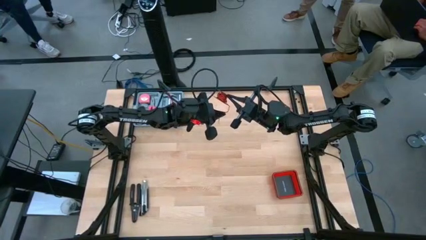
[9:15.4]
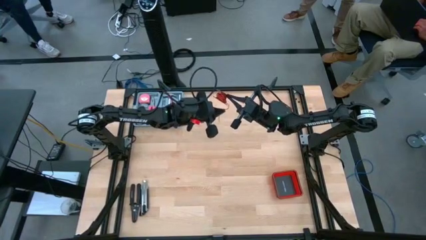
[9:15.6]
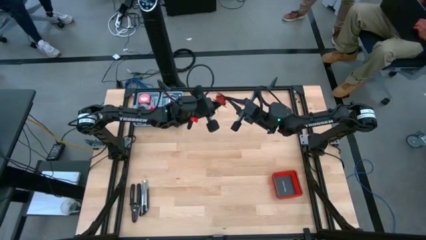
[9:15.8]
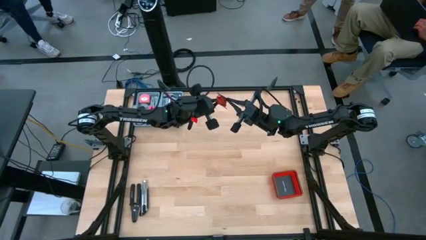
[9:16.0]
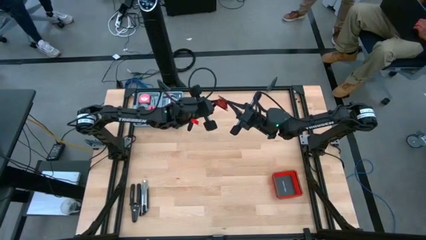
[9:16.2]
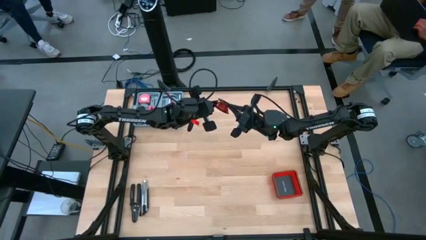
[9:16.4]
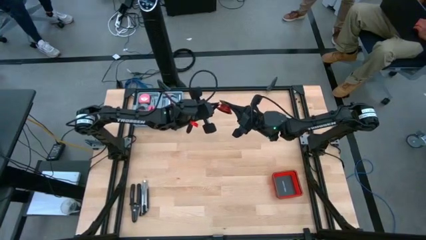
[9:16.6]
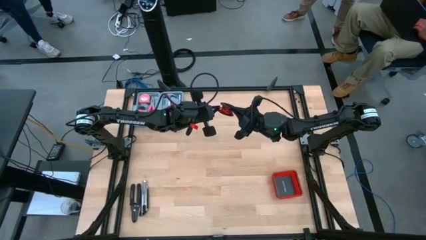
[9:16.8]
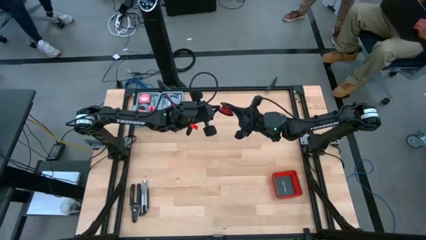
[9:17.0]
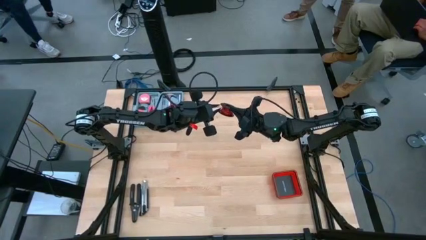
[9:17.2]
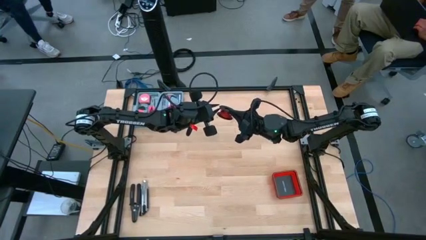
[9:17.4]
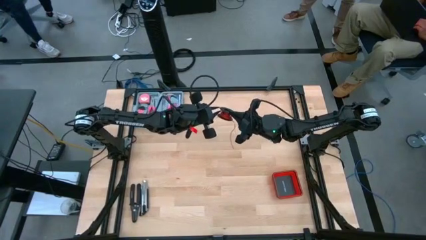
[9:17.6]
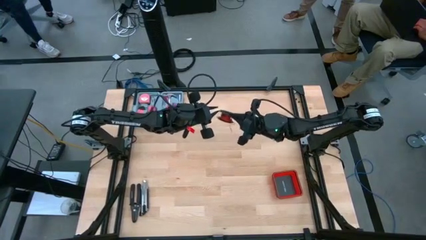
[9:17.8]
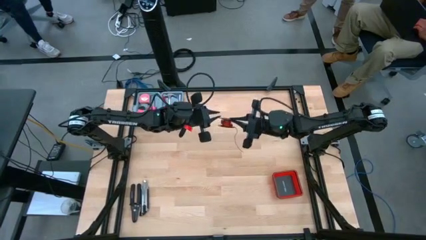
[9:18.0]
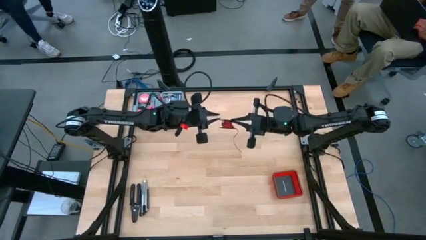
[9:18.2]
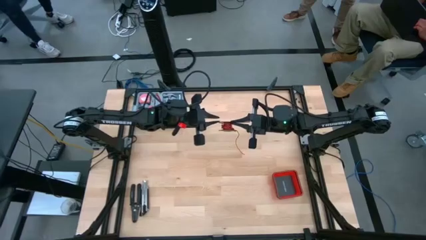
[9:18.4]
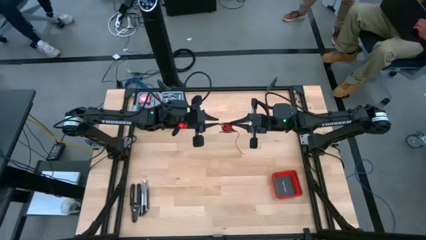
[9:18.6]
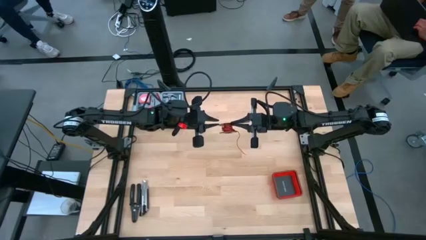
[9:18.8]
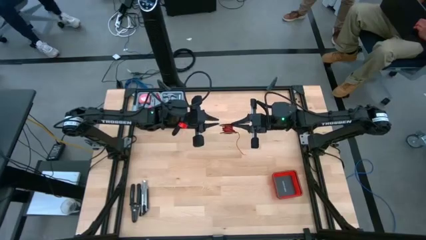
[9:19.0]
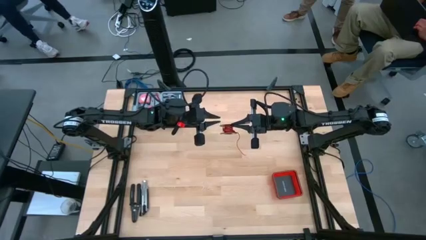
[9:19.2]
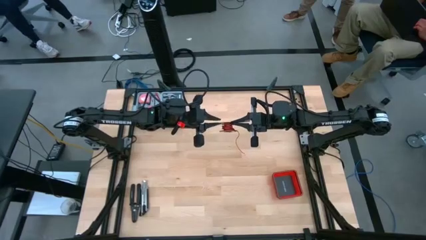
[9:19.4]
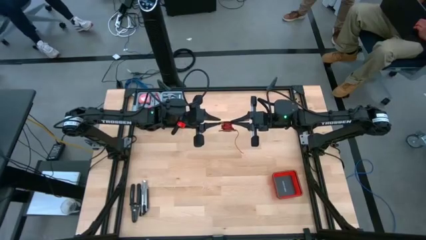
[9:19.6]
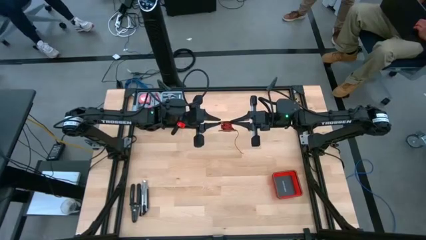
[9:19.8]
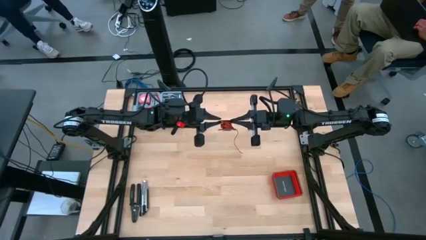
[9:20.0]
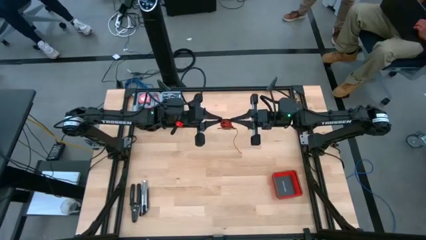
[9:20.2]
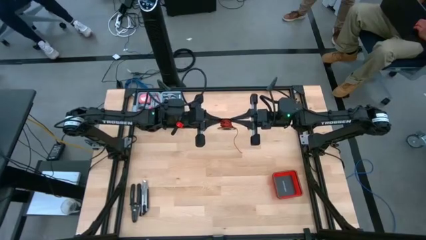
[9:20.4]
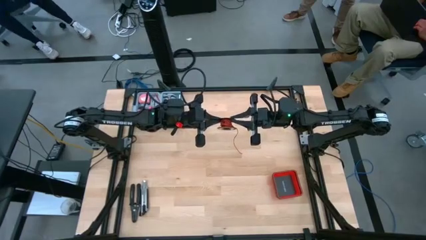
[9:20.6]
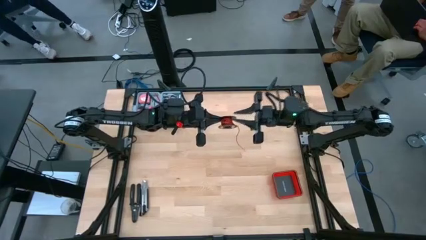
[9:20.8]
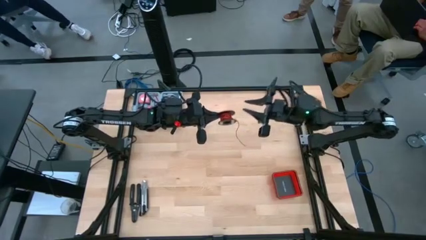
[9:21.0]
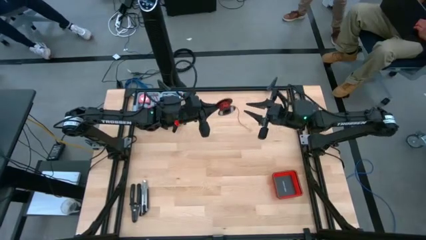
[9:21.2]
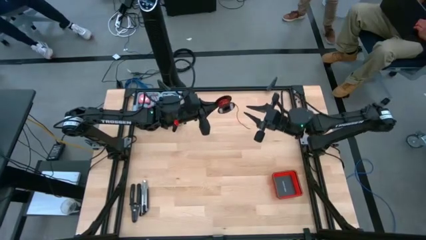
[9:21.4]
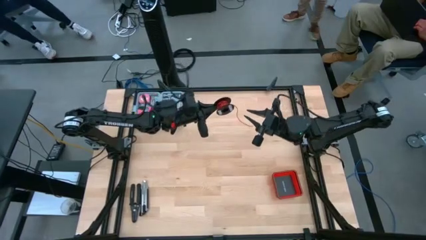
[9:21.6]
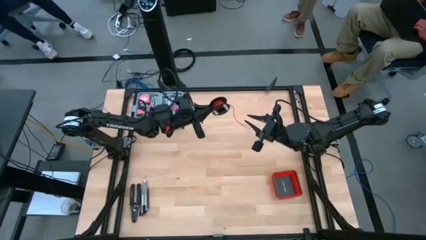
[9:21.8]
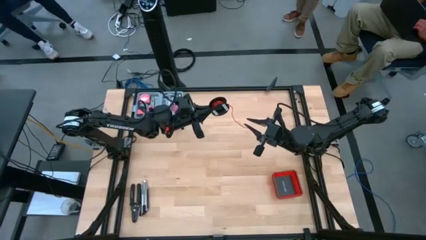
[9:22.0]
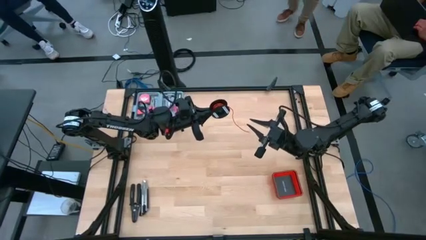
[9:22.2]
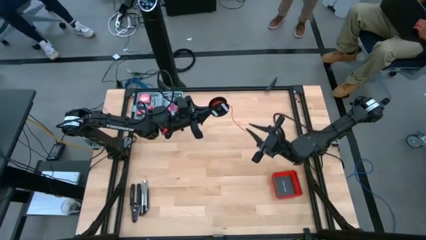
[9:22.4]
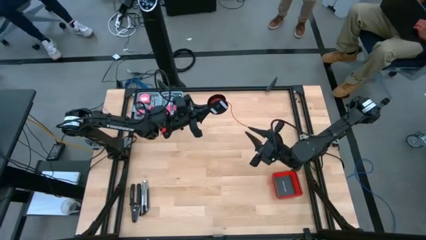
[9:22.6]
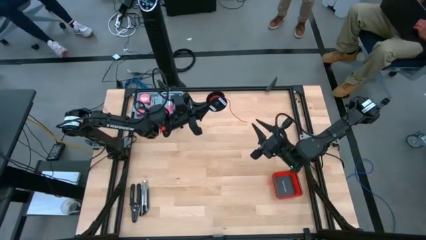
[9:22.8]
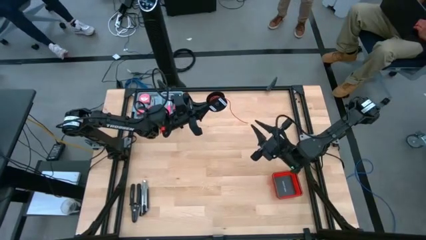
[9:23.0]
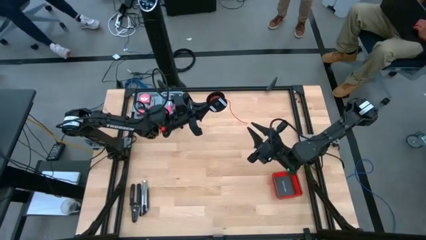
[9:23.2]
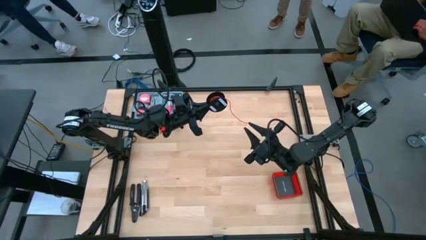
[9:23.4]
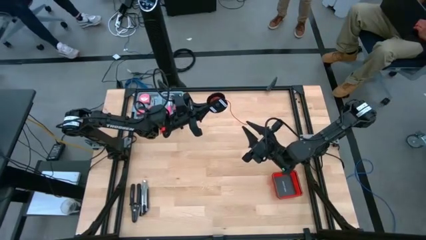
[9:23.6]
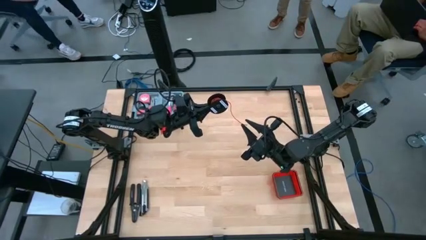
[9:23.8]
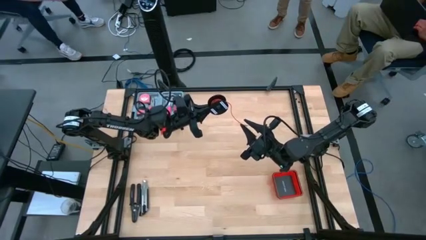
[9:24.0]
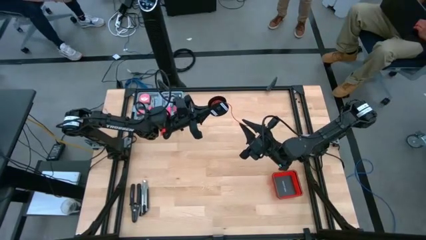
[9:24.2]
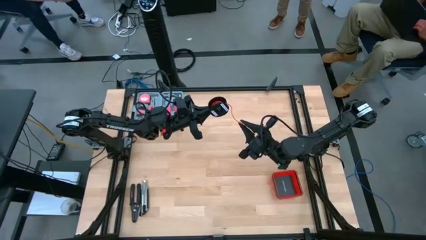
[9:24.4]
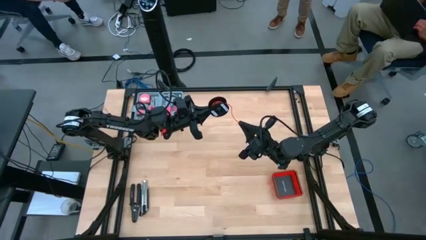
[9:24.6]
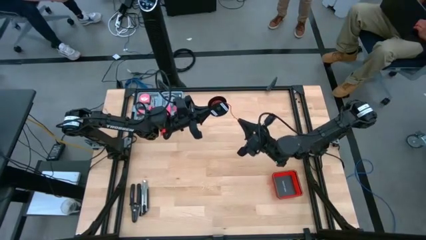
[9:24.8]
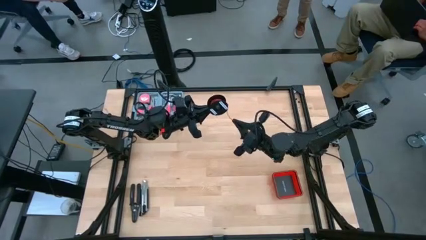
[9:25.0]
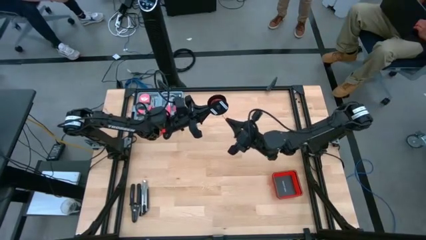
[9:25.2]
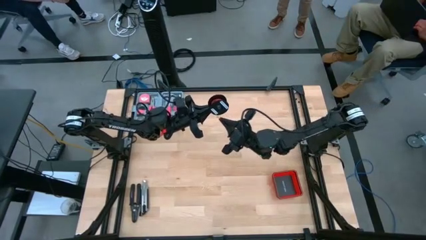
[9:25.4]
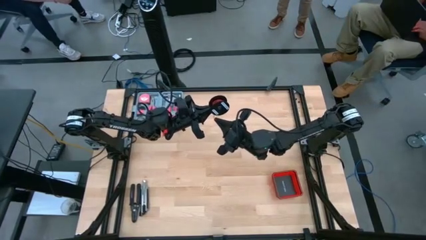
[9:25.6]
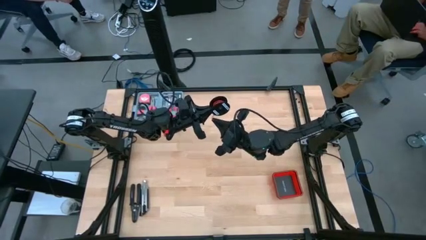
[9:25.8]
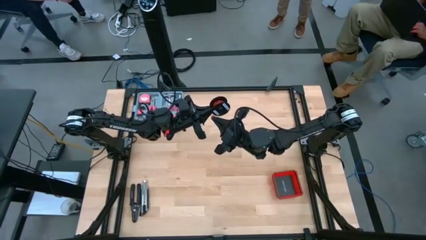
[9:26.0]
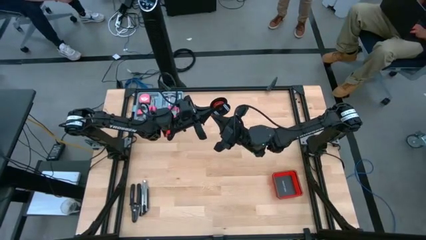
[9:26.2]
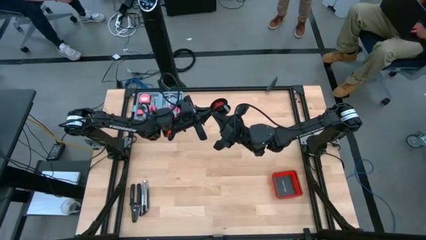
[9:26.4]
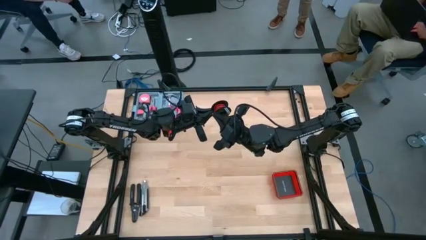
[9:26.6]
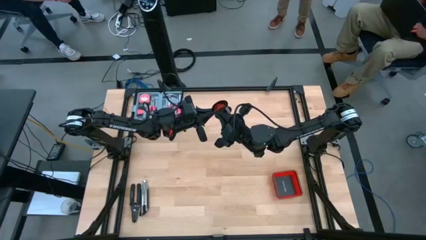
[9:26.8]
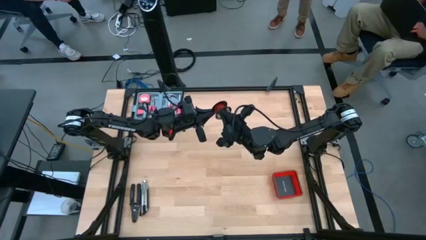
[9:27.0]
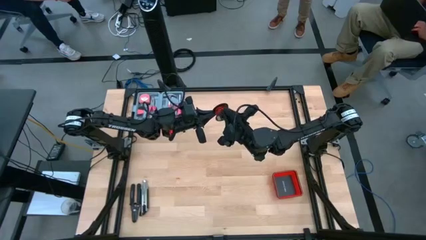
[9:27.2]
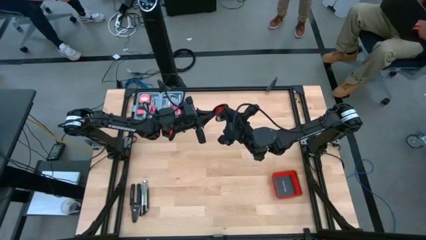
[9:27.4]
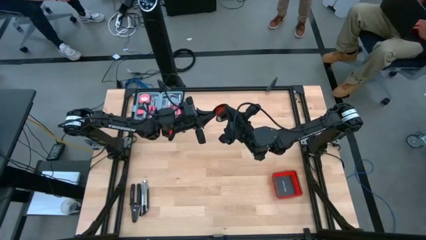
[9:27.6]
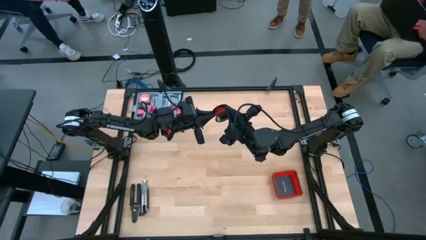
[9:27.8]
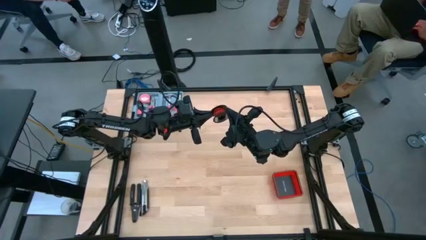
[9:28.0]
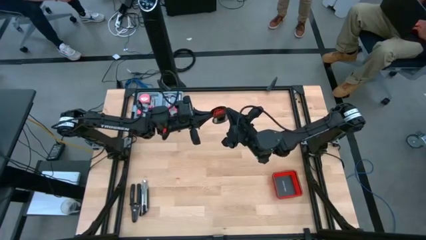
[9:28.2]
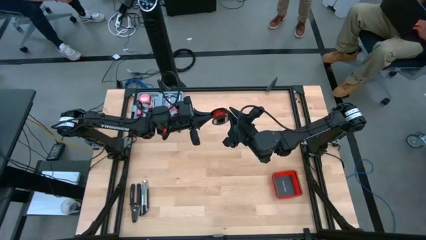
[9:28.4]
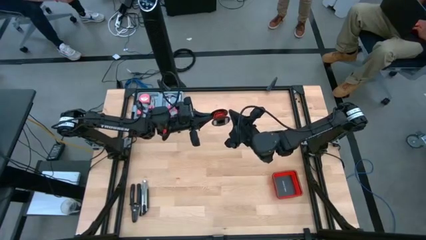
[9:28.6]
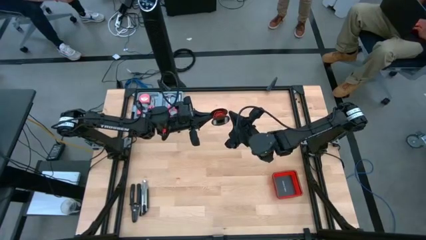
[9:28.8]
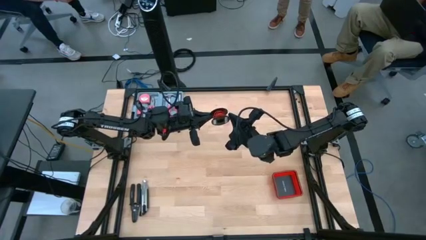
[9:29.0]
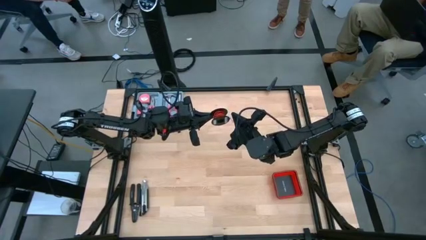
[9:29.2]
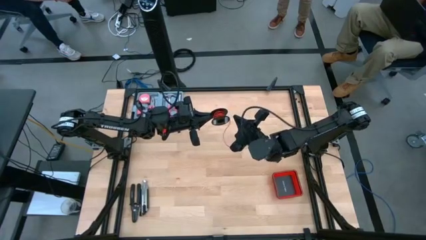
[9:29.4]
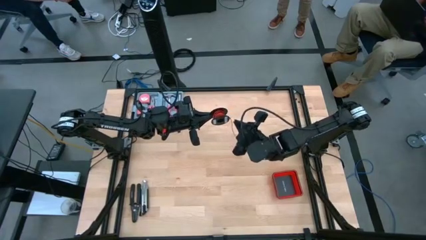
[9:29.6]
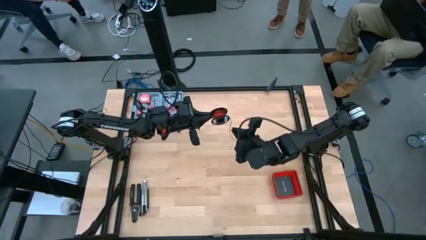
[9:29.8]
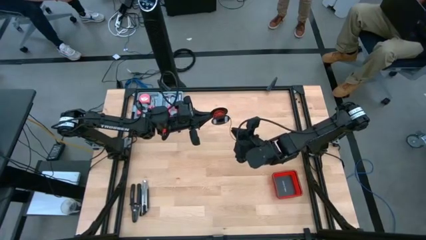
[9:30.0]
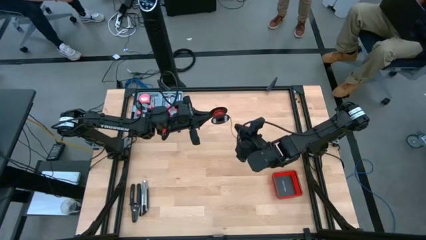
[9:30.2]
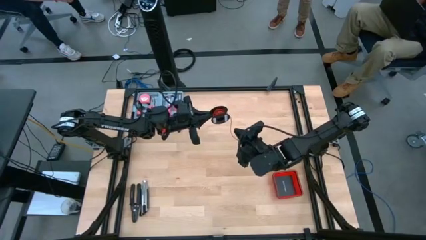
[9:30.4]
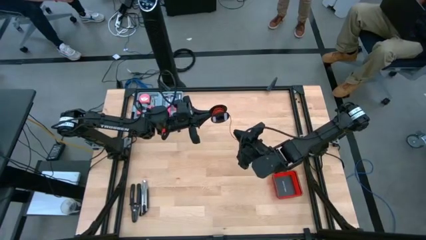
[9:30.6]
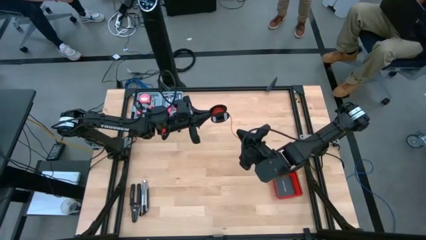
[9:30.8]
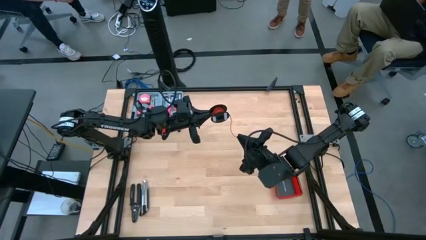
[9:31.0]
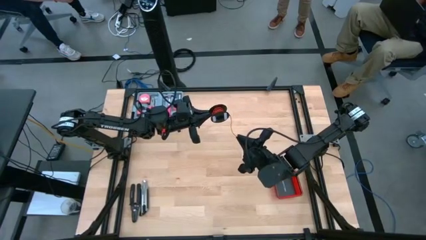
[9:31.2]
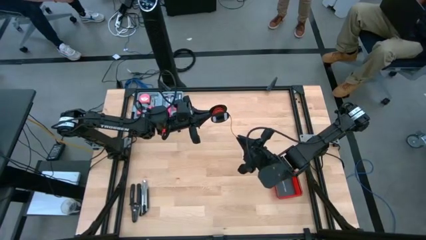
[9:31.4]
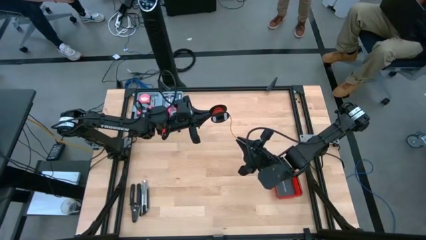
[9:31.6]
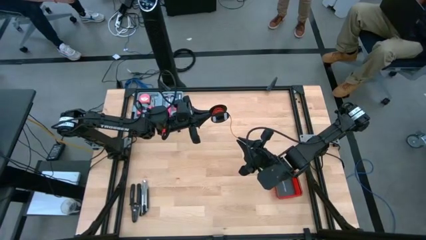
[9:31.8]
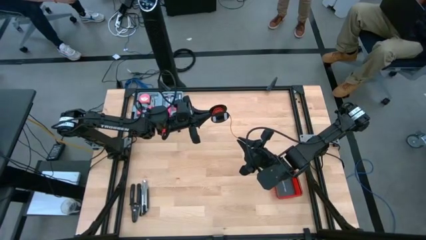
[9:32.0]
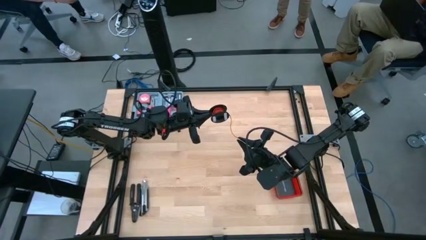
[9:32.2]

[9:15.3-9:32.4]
Task: Coil cords
Coil the red wire onto the spool
